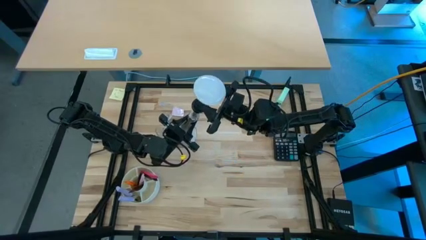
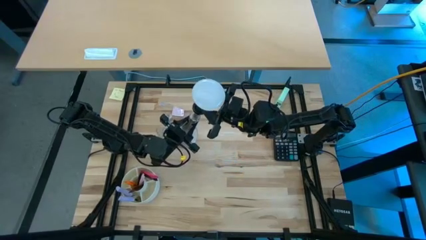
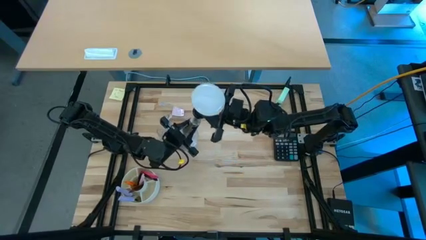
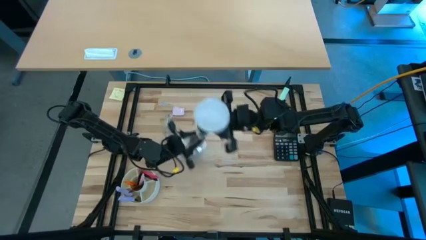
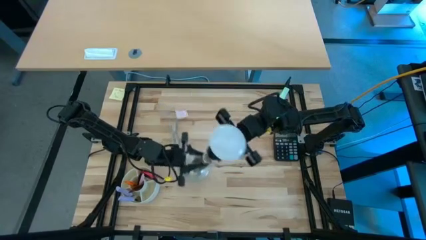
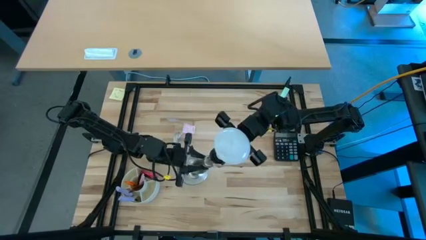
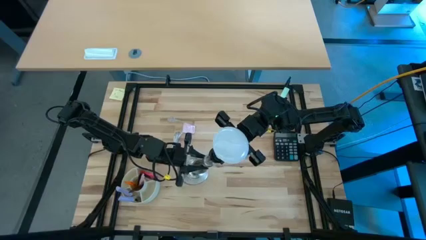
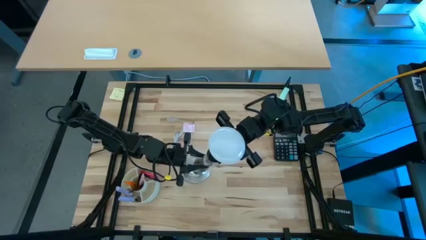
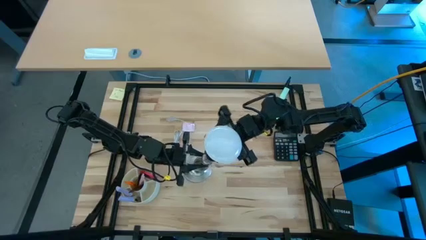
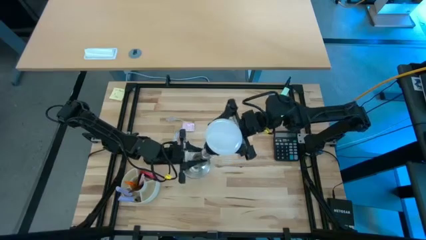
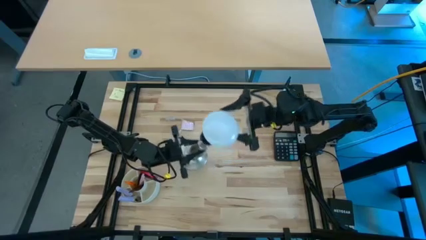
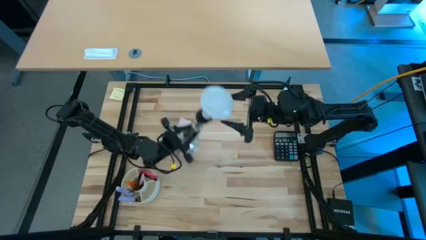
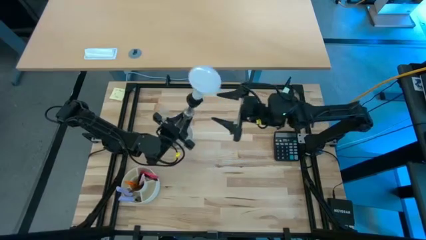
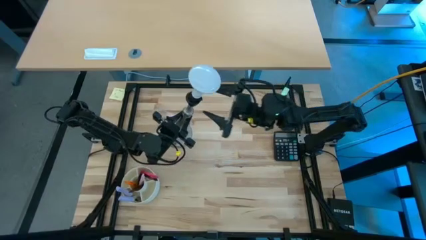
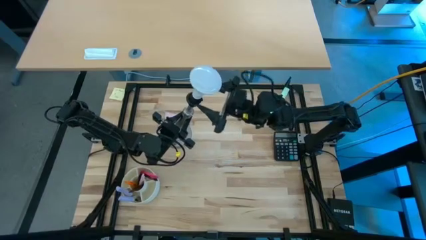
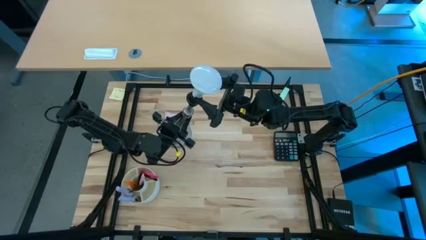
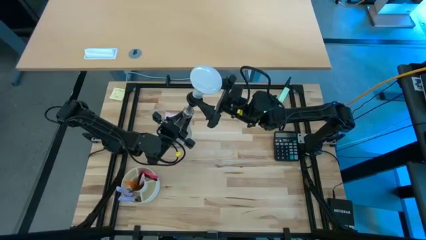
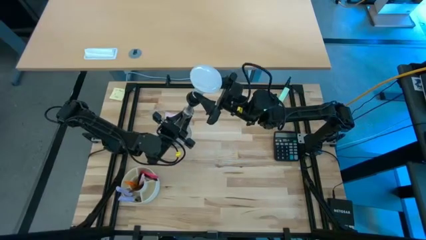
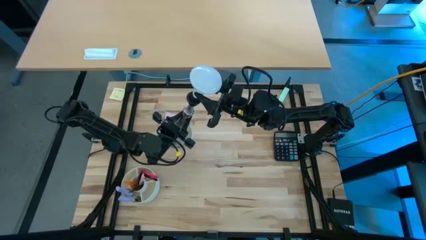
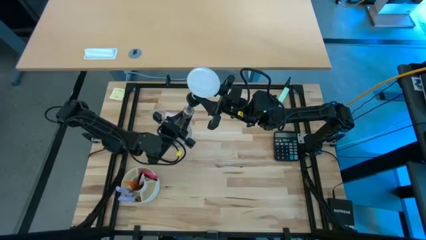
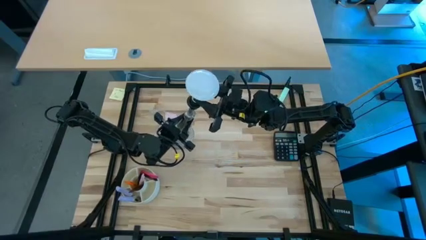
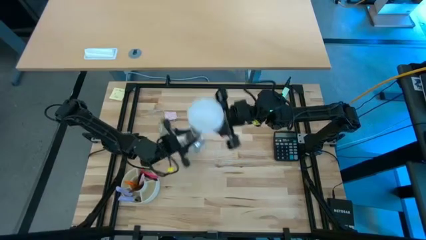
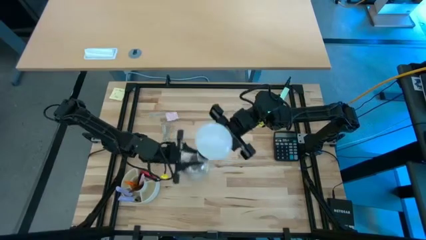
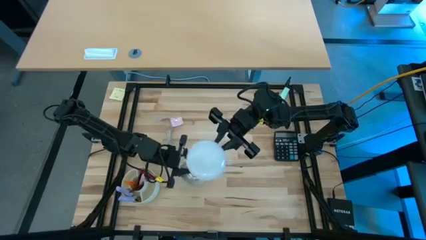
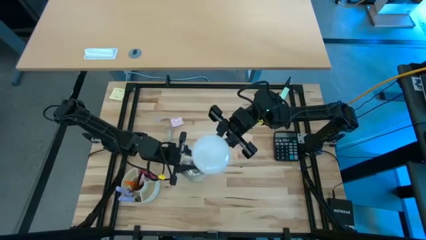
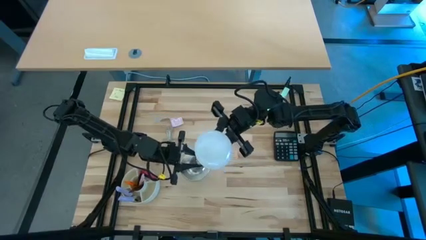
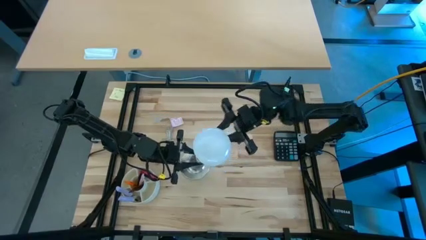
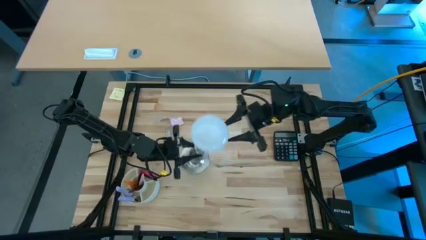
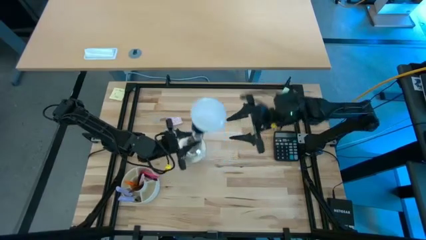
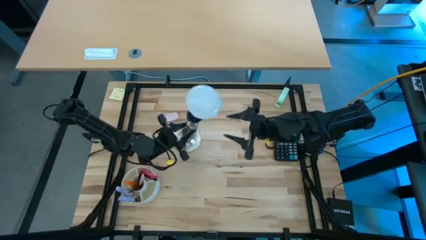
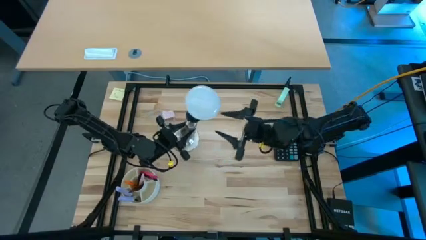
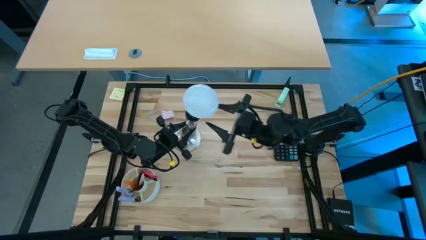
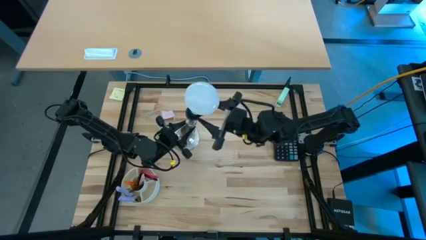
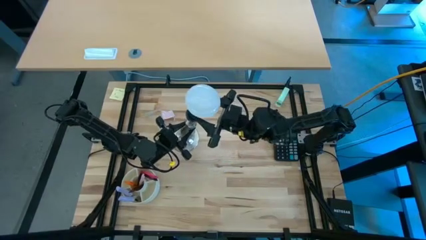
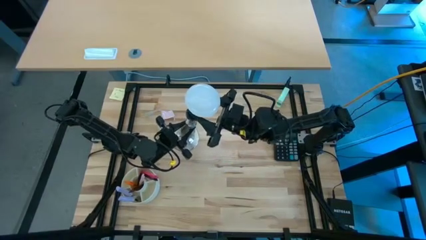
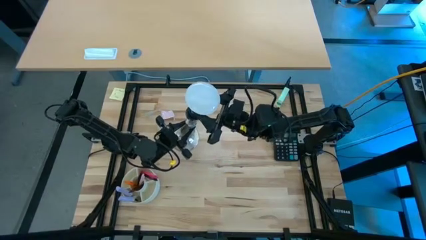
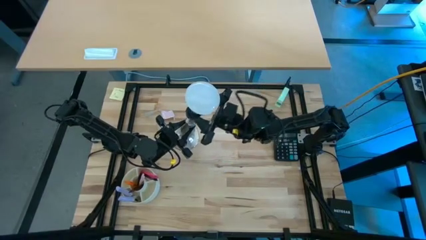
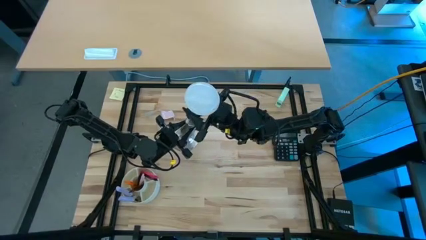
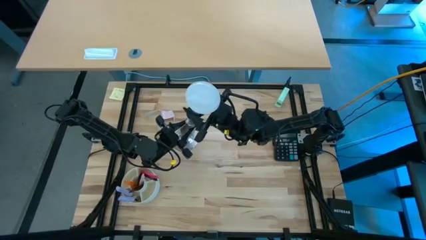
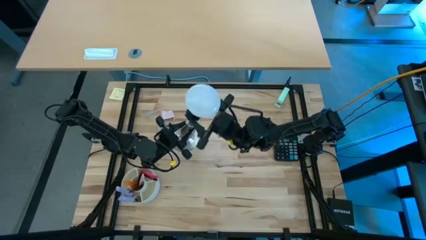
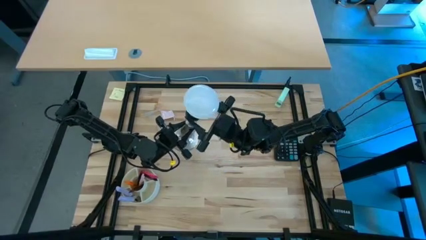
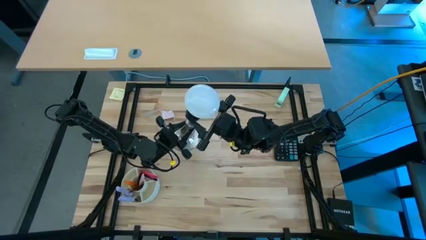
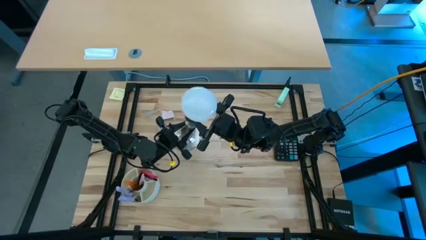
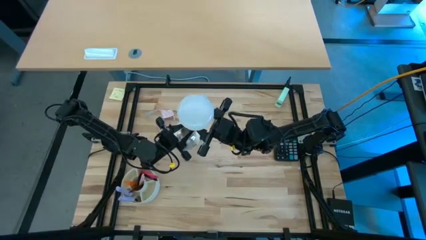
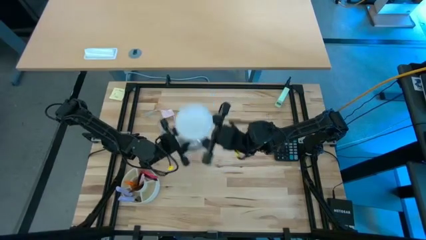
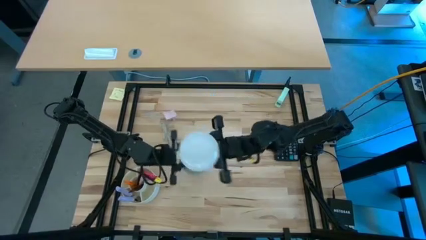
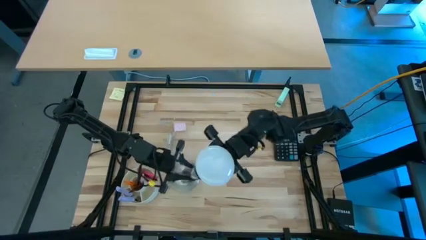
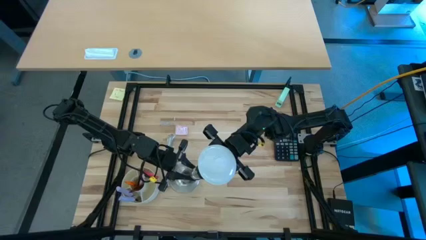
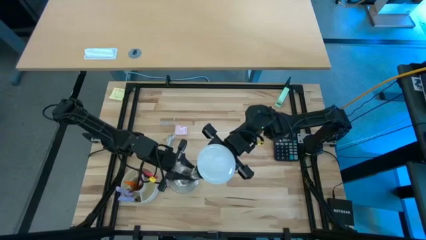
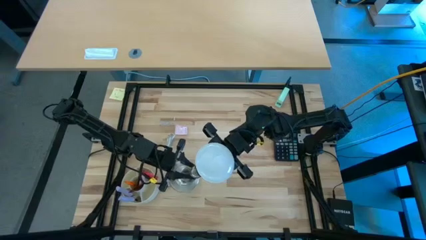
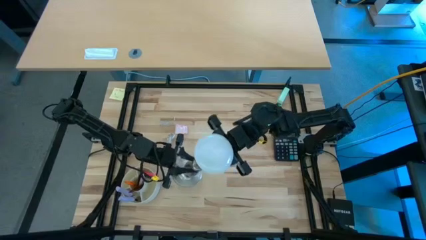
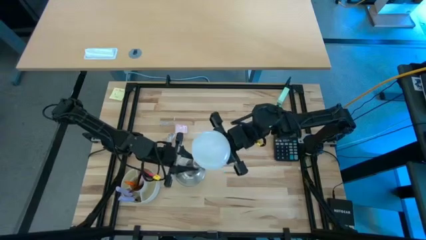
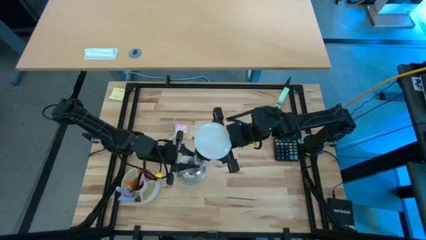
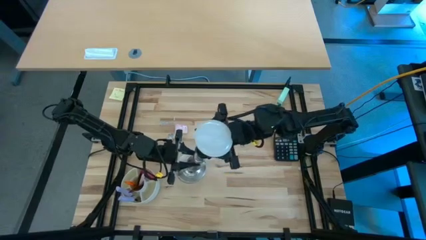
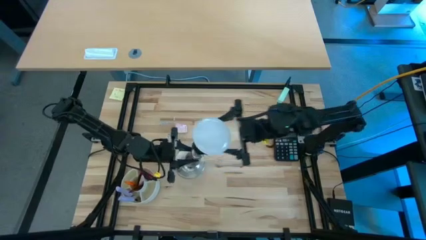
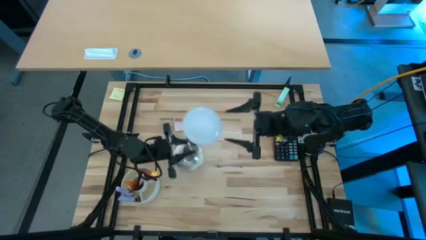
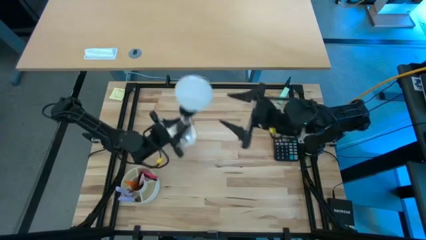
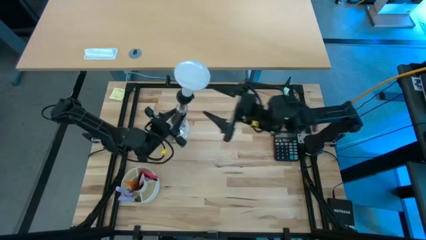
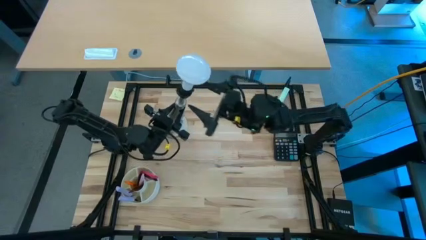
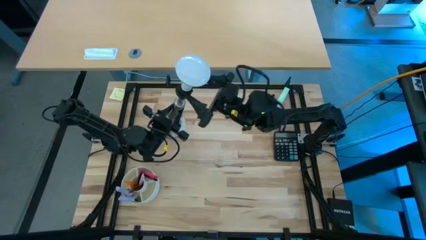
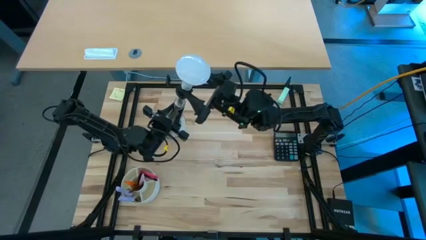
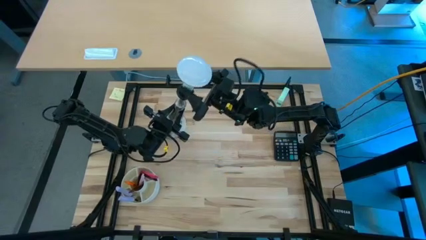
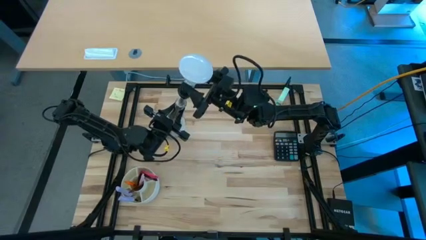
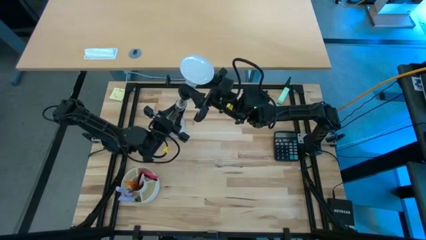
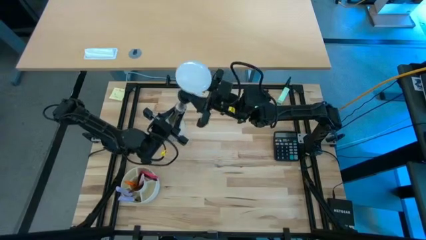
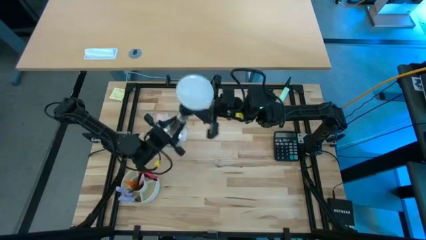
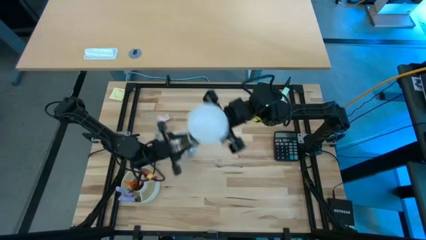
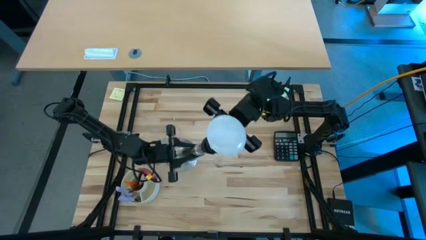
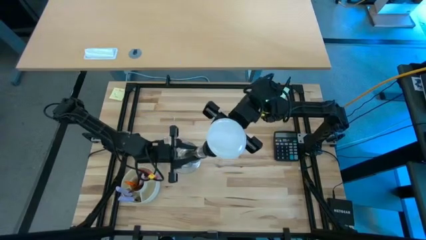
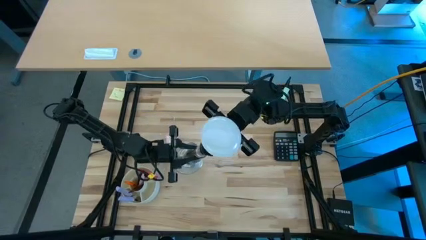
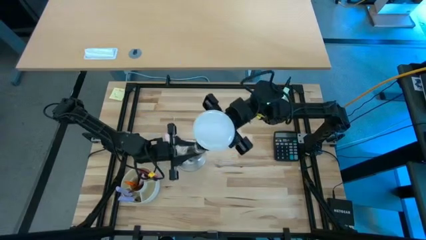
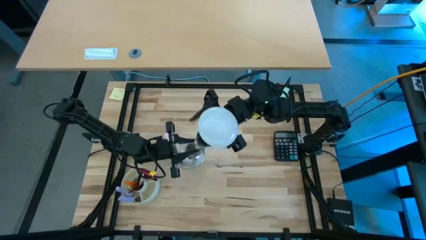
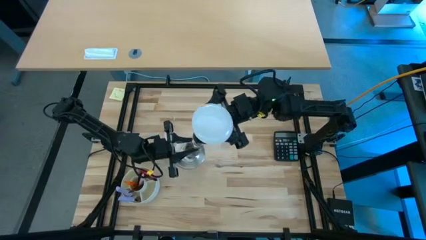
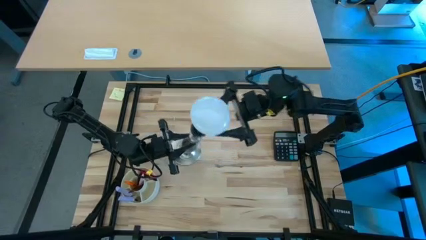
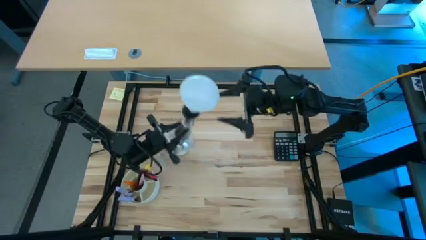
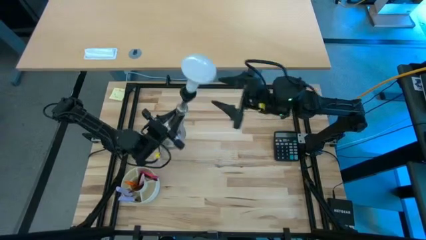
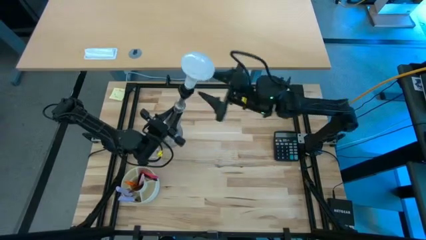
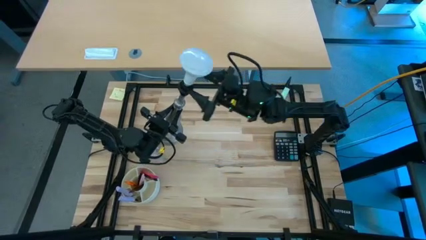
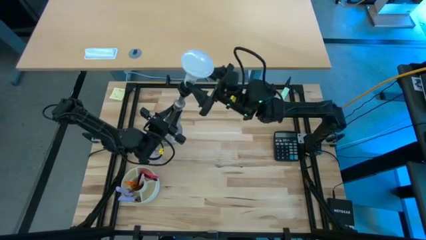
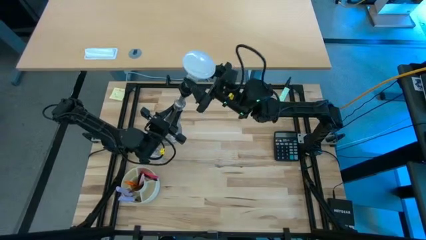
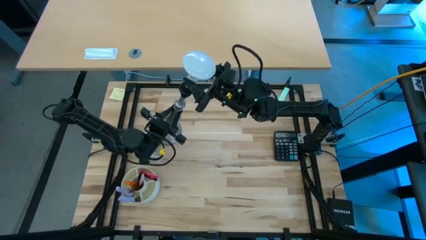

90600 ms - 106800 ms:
Task: Screw lightbulb
Remove the white lightbulb from the silver lamp
